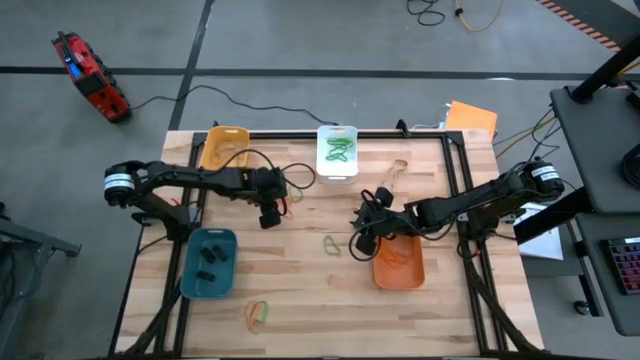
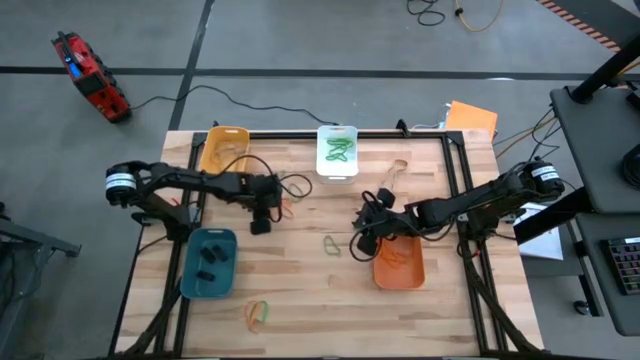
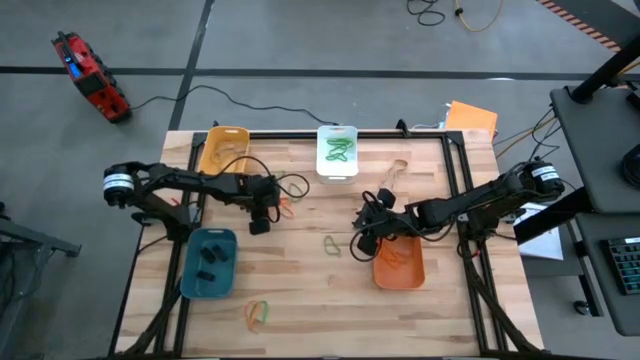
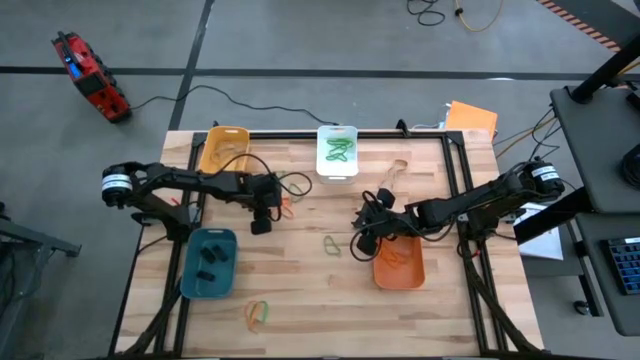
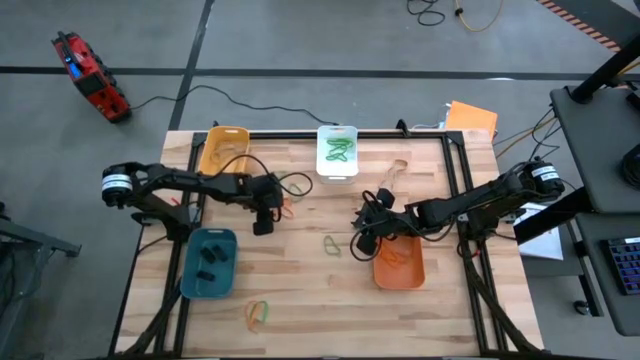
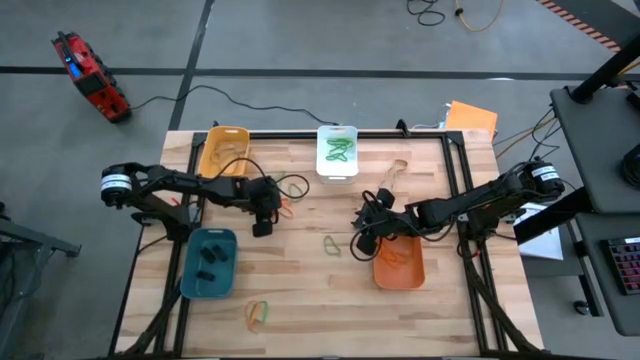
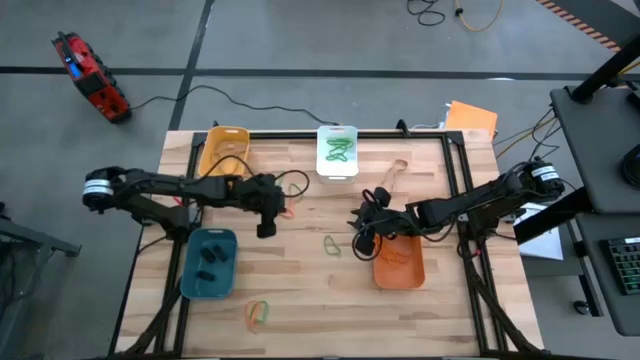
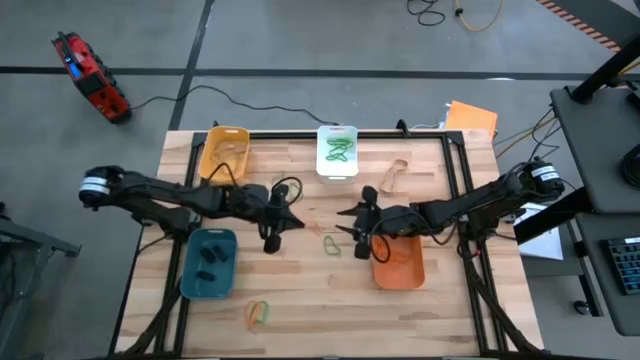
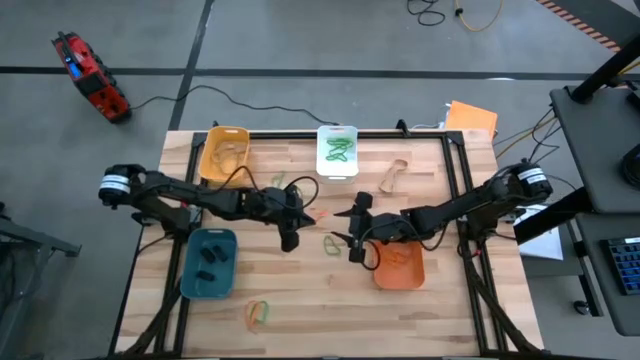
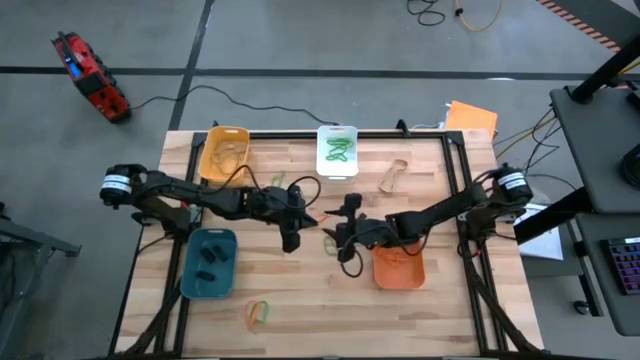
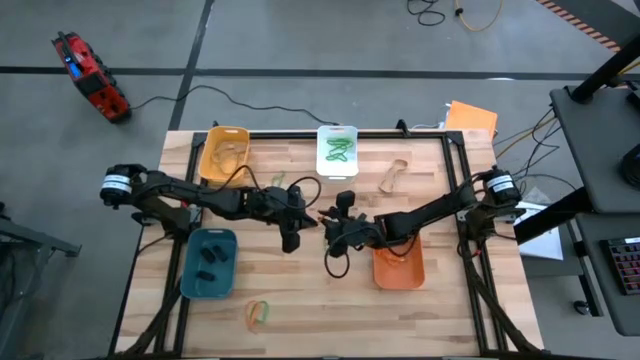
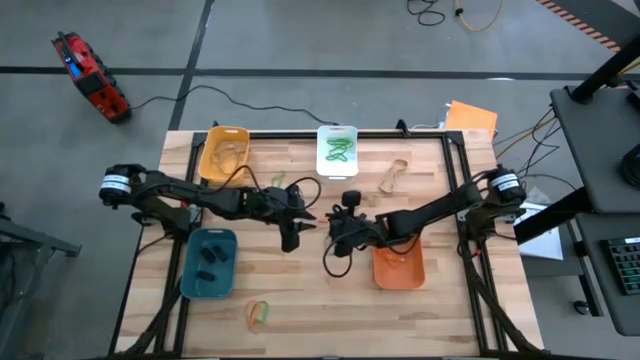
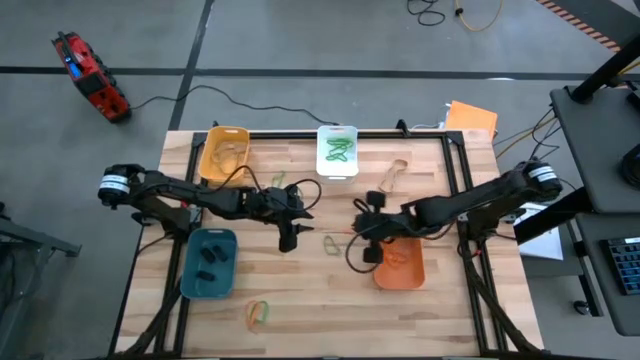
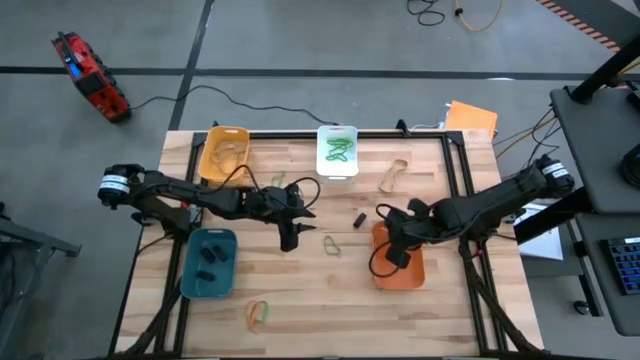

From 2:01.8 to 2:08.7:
Task: Sort rubber bands into baskets
Put the orange rubber band into the orange bin

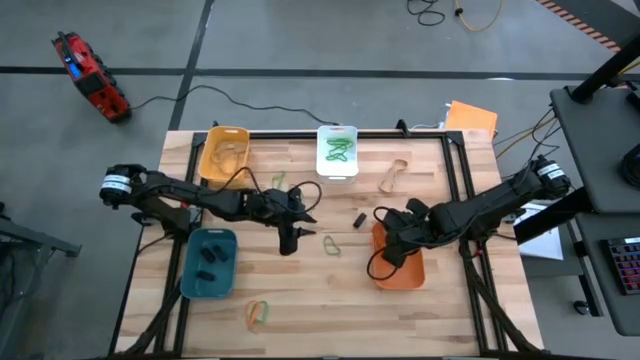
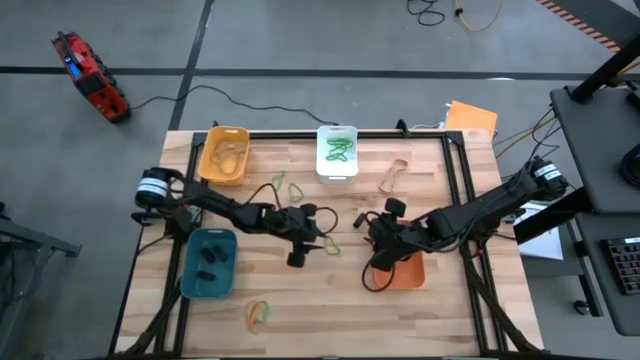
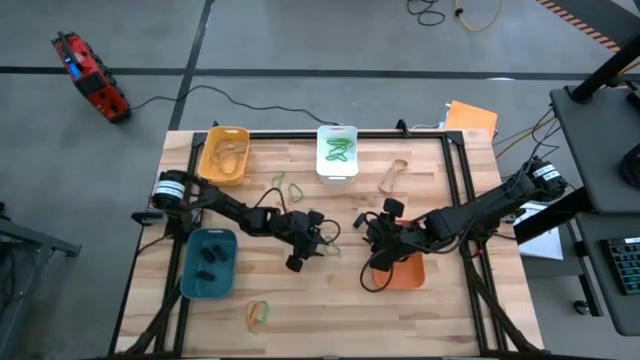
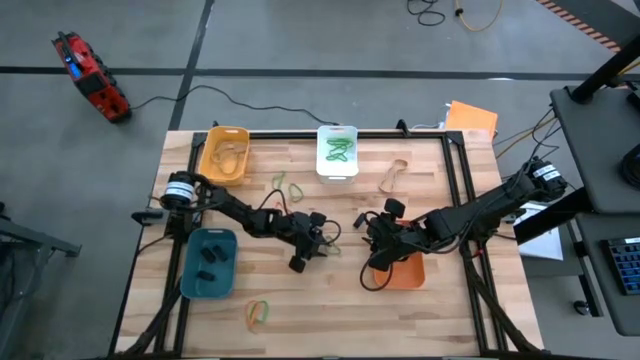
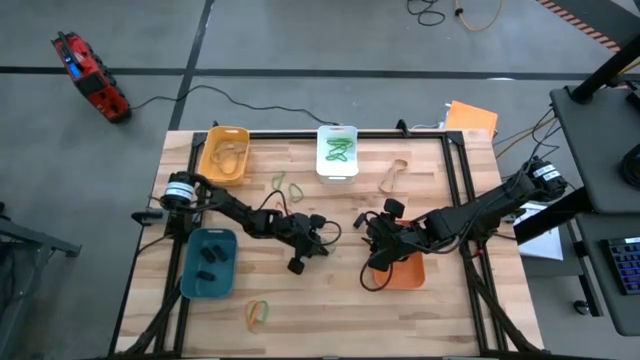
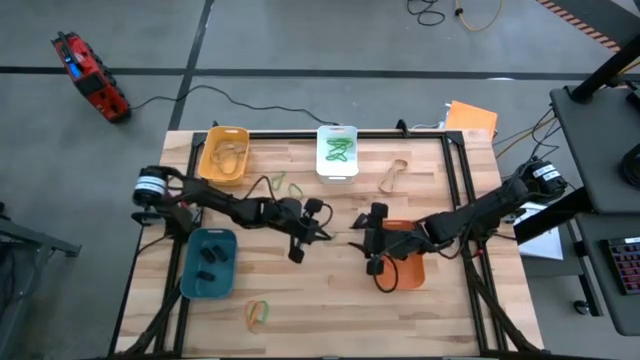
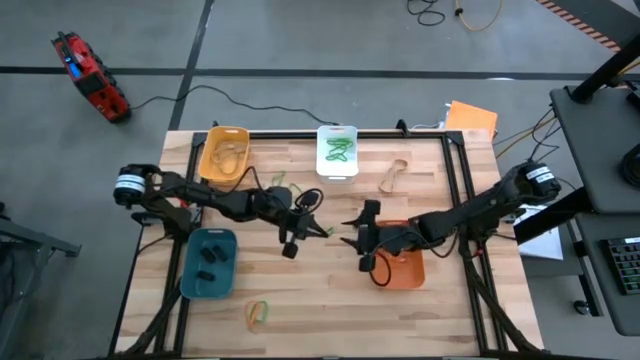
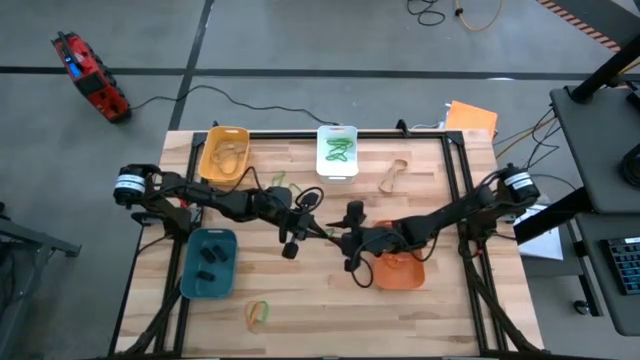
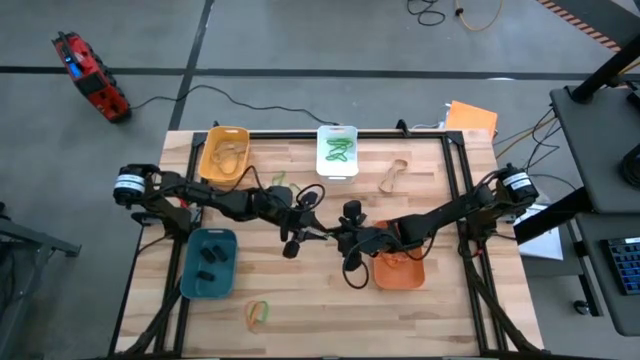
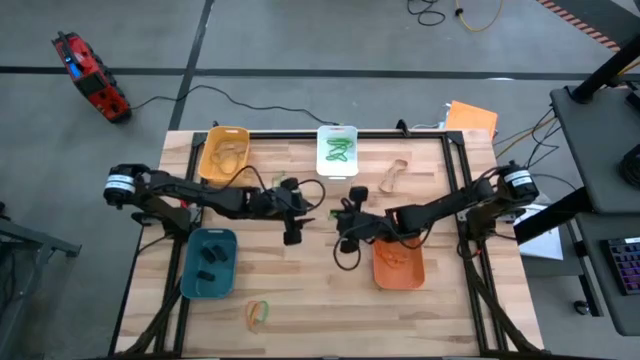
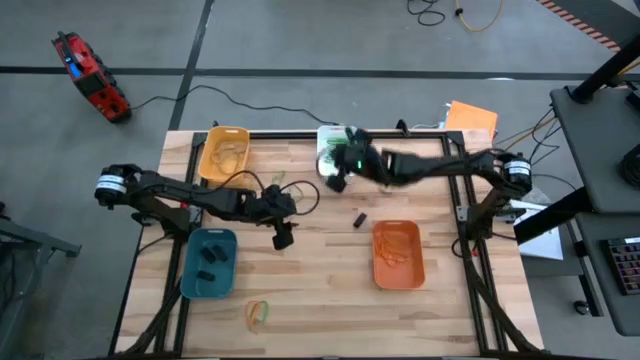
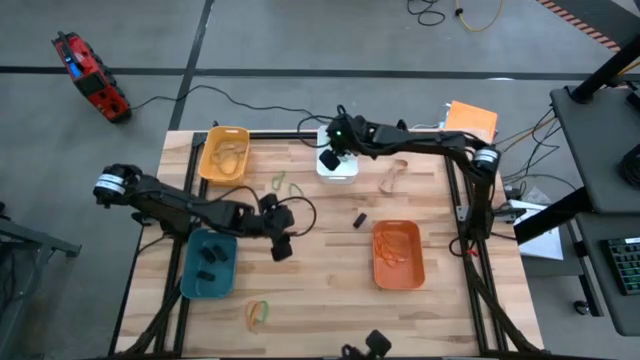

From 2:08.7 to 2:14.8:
Put the green rubber band into the white bin

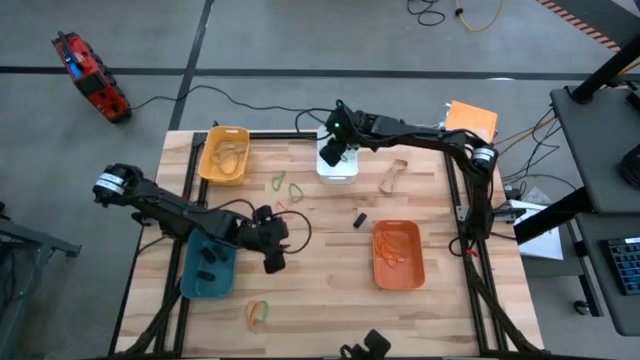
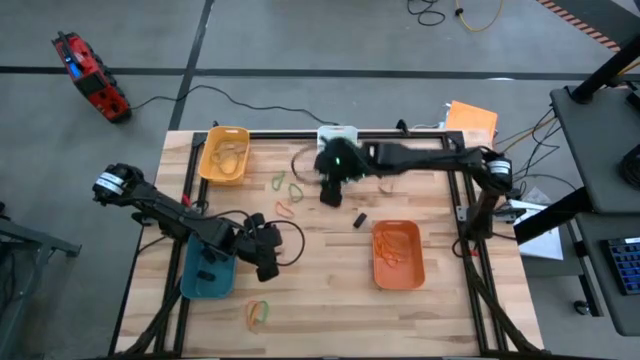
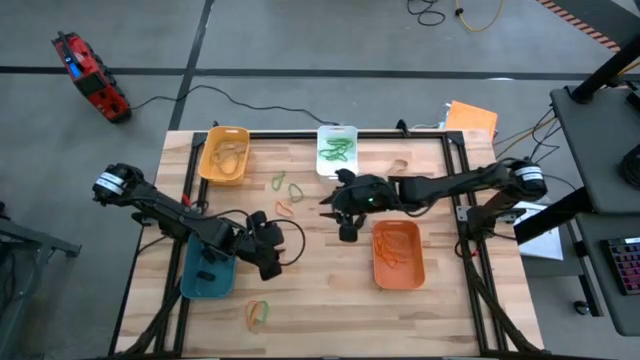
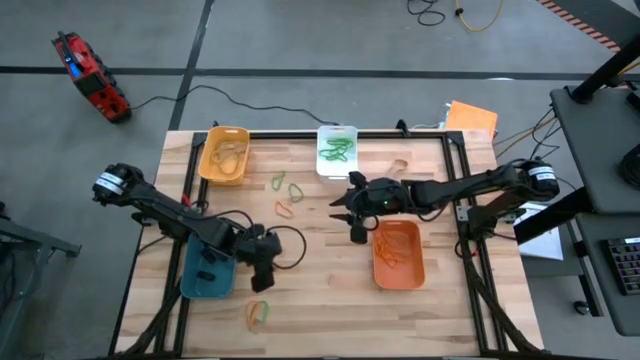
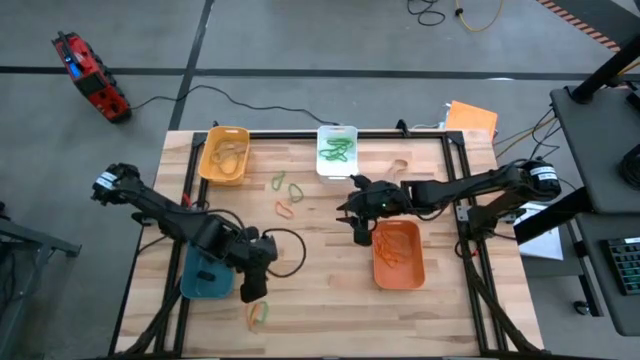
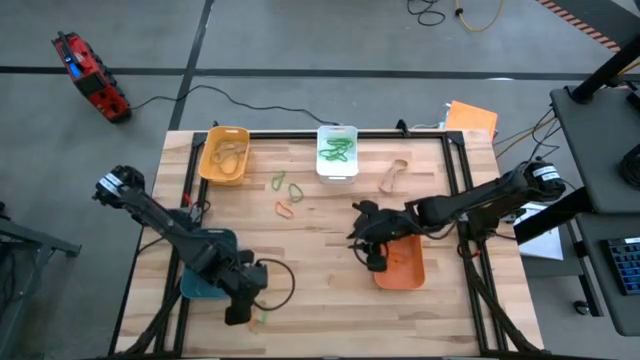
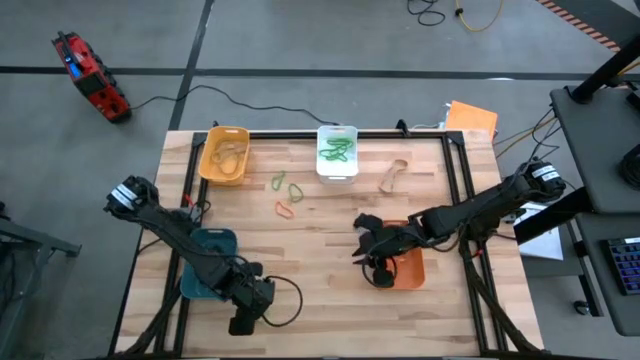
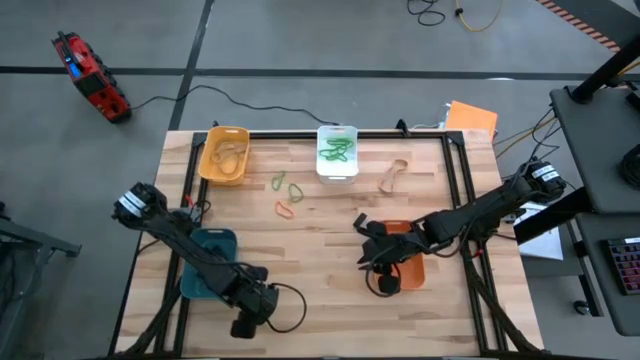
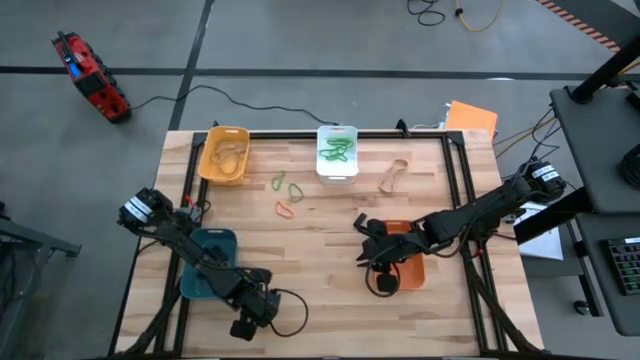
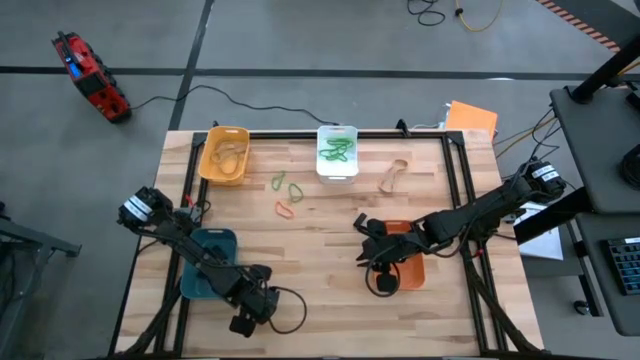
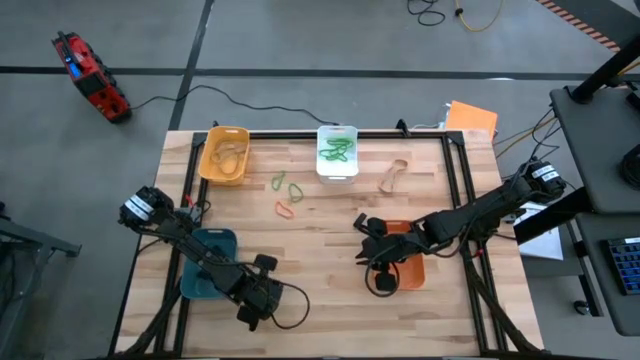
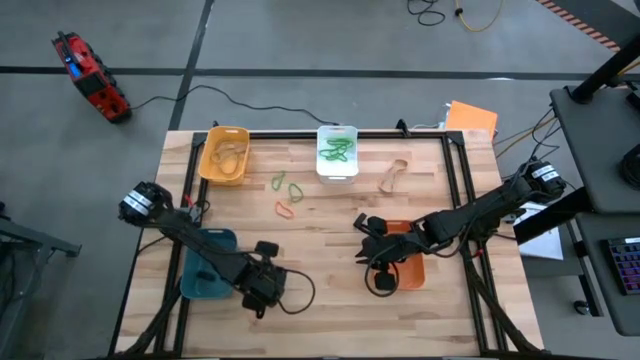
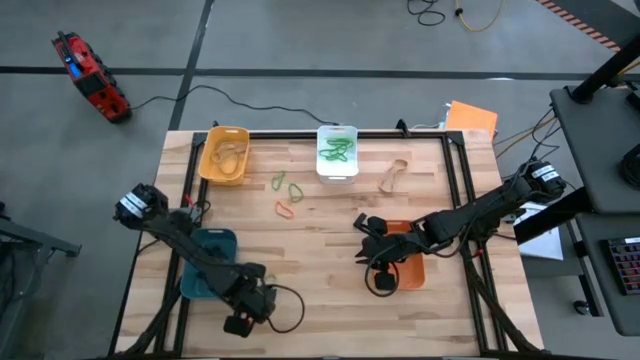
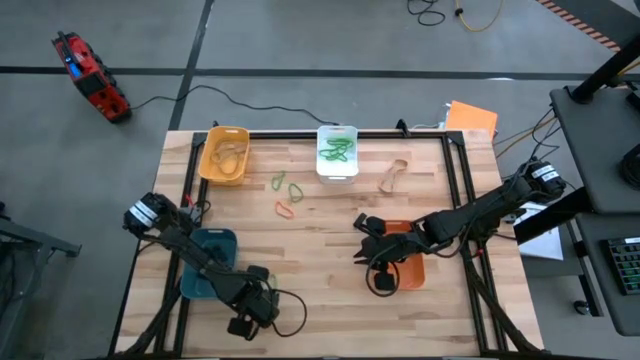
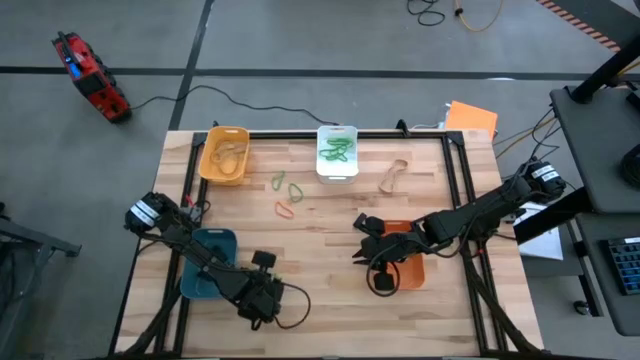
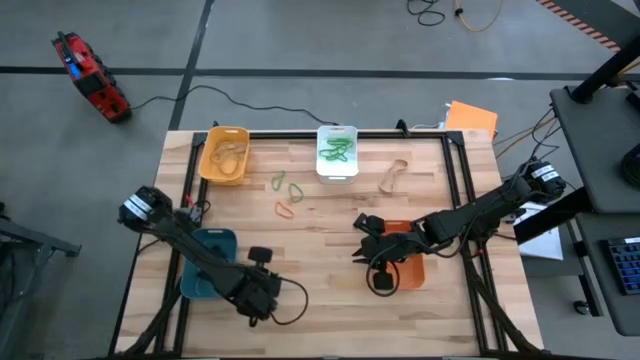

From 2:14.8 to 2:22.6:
Put the green rubber band into the white bin
